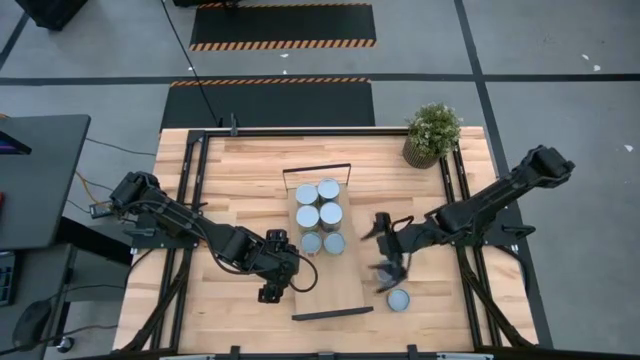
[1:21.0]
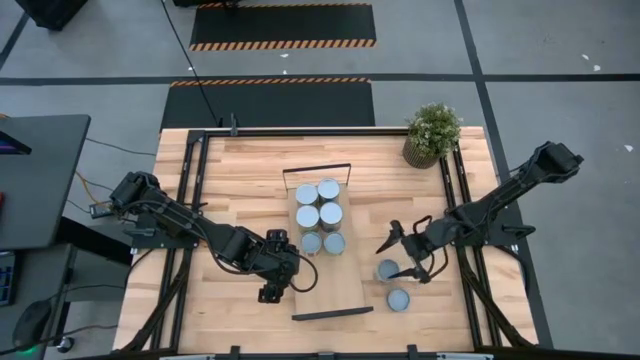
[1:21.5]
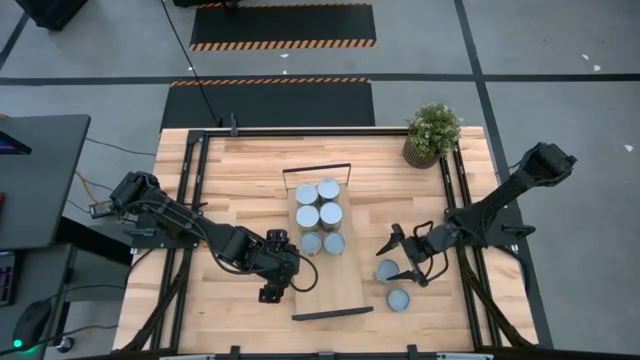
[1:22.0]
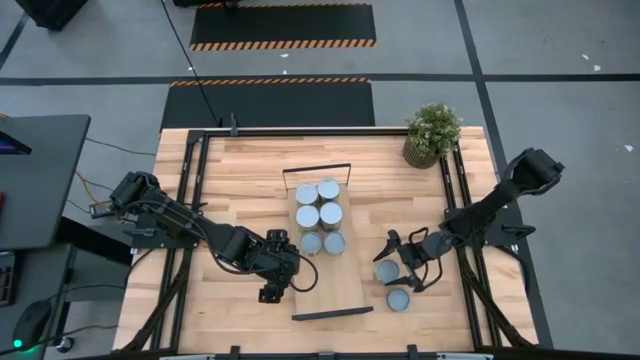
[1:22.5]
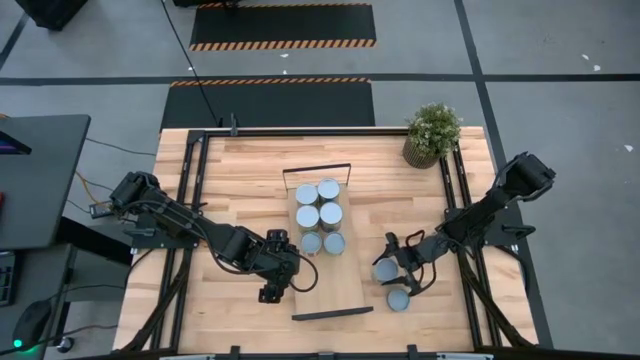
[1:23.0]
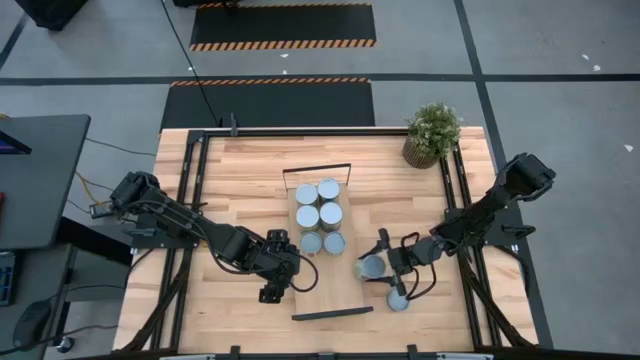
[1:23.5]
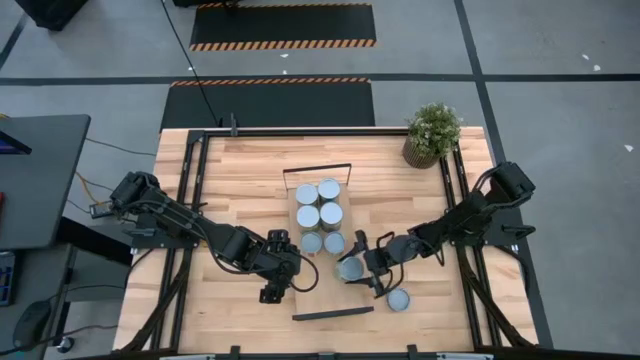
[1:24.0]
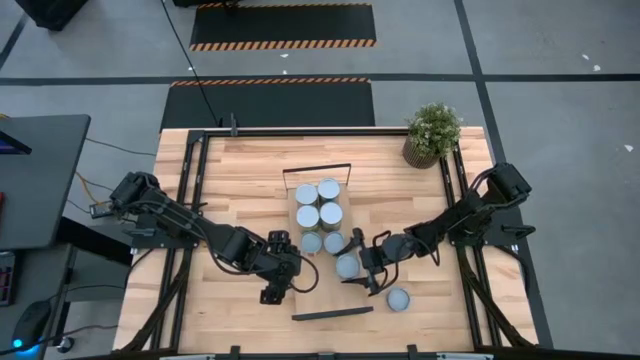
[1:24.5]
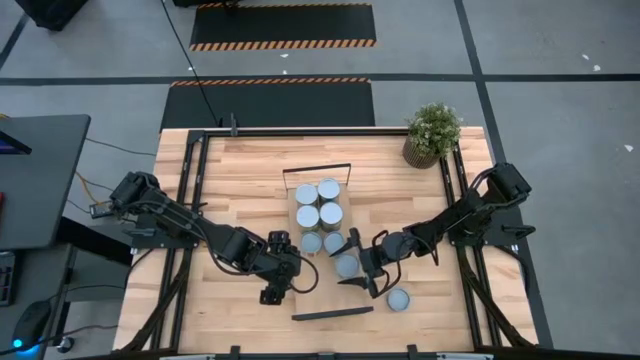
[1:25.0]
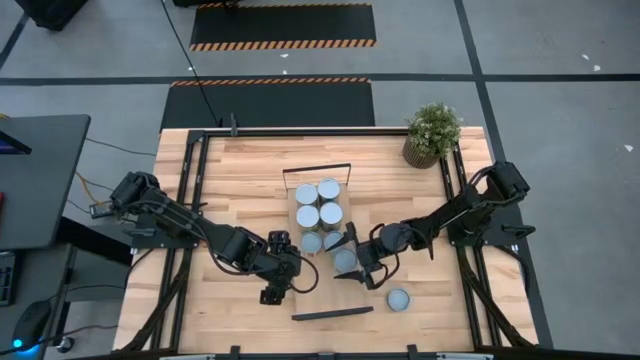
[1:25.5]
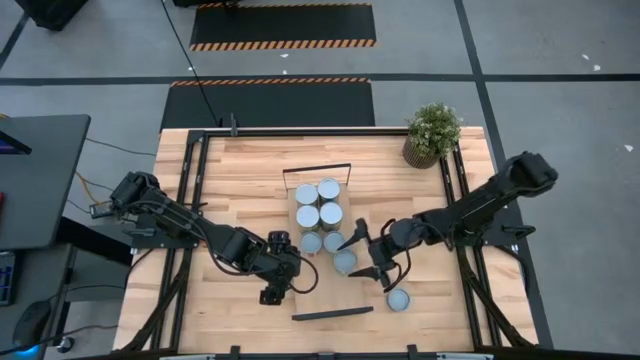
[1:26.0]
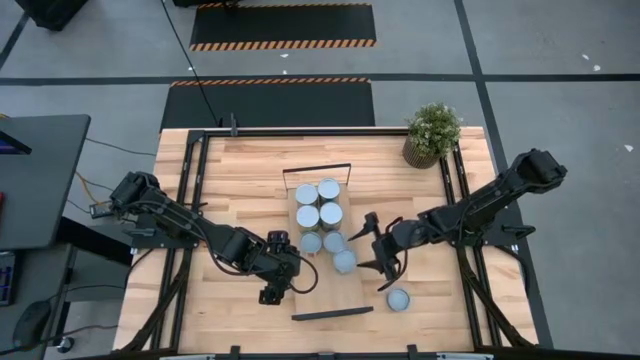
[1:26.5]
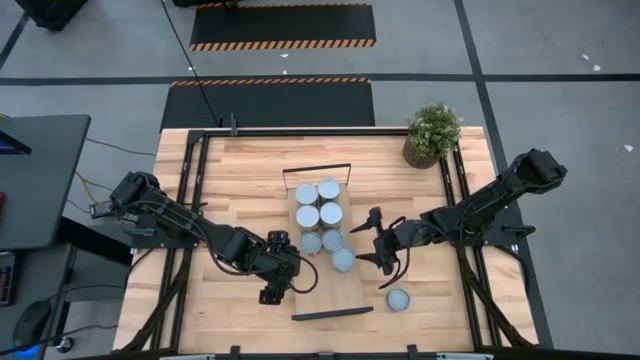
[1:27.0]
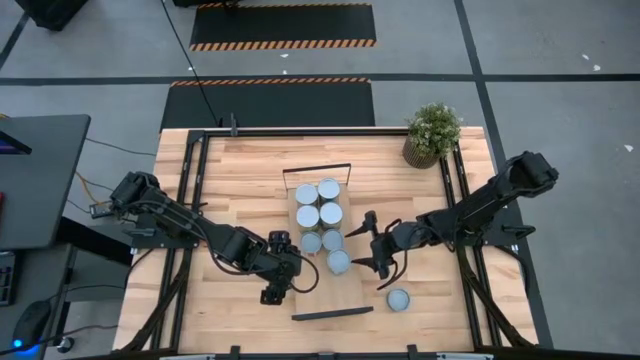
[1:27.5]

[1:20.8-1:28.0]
Task: Pick and place cans onto a shelf
Put the canned mixed vegetable on the shelf

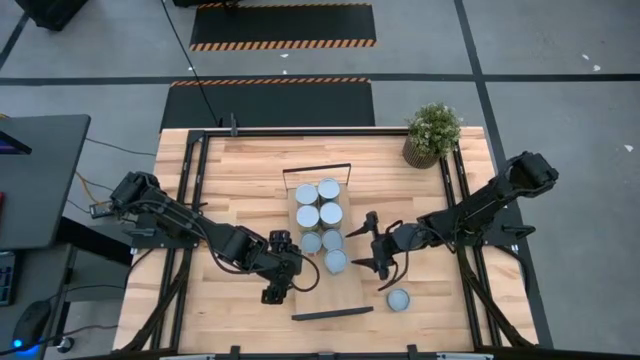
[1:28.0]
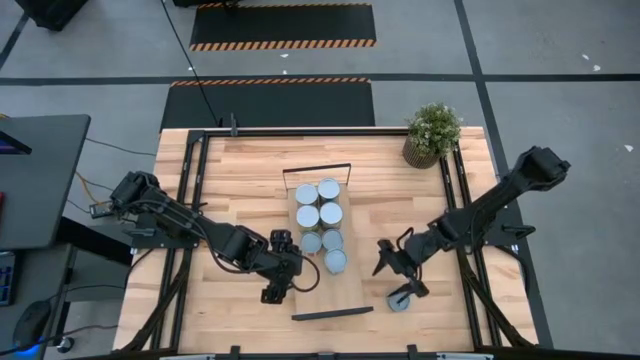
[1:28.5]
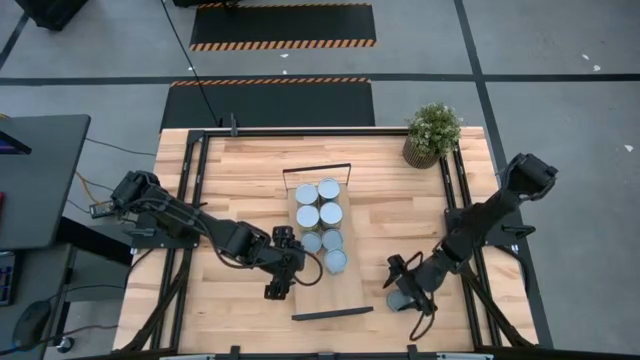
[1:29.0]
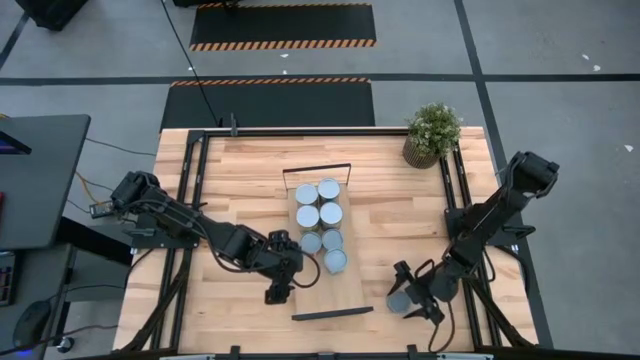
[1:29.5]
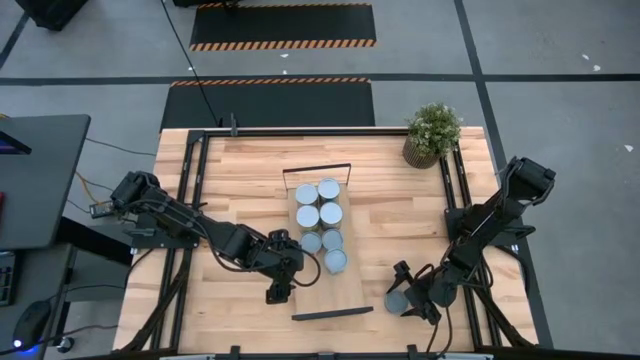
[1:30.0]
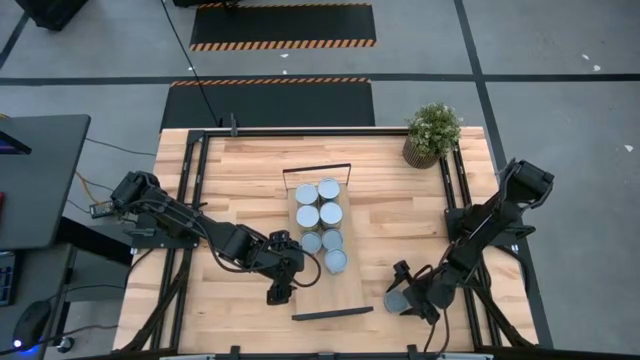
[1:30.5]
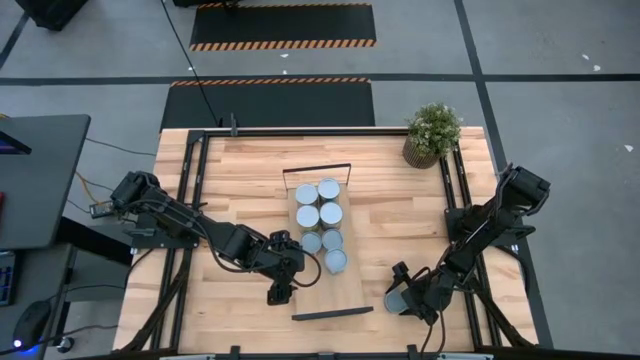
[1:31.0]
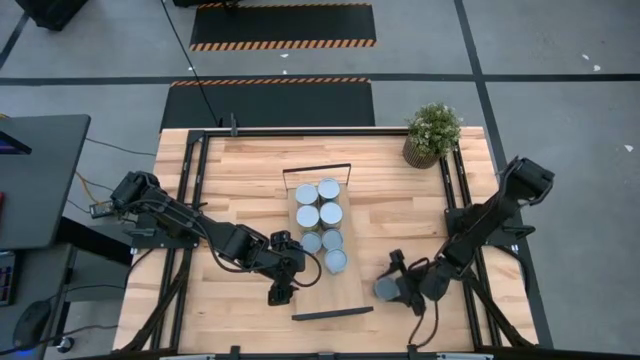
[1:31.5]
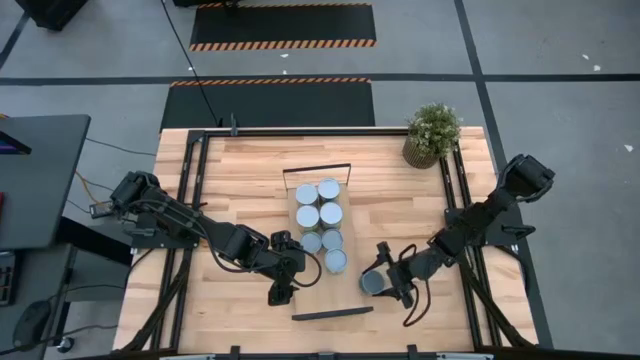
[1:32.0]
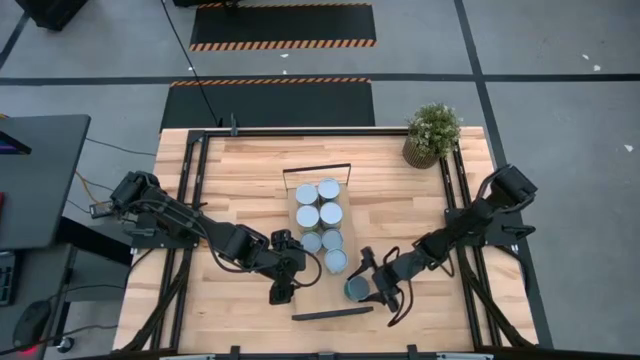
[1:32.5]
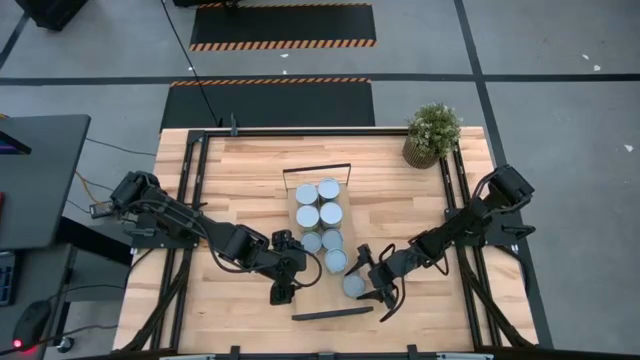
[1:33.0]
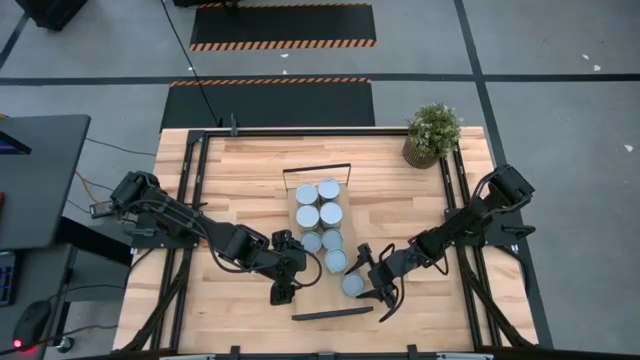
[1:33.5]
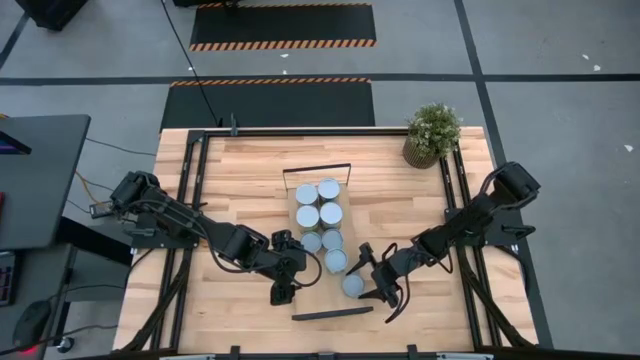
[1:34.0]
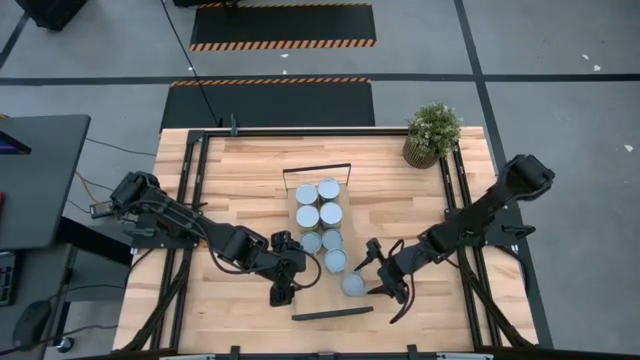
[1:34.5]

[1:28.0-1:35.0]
Put the blue tuna can on the shelf

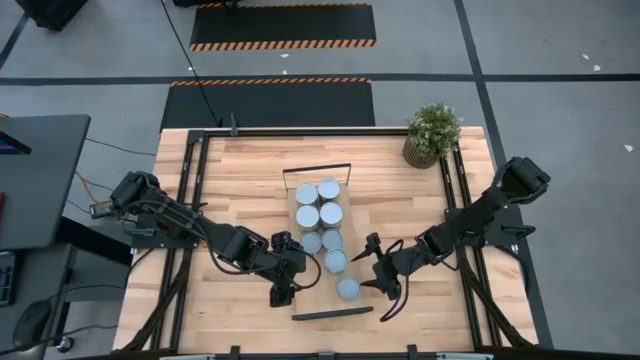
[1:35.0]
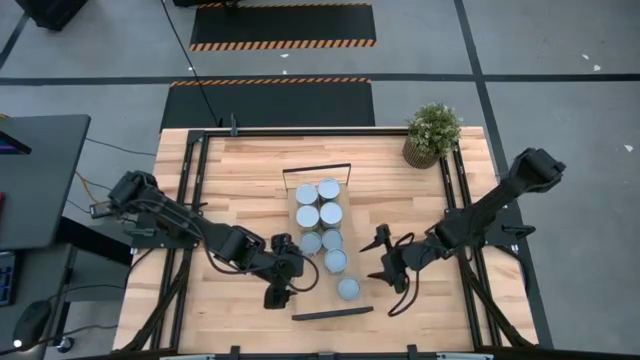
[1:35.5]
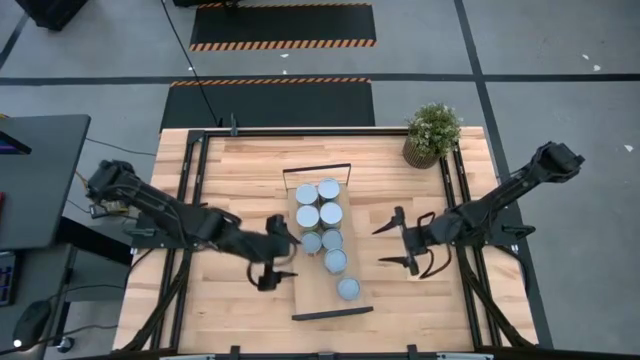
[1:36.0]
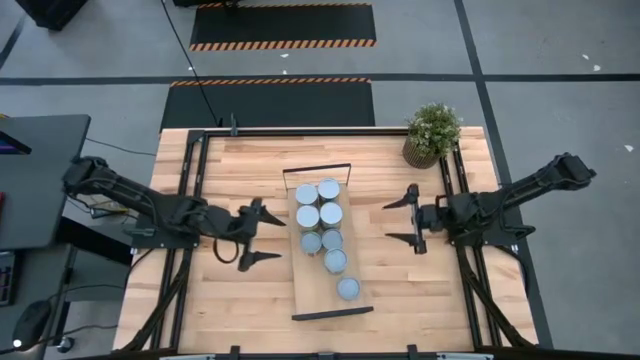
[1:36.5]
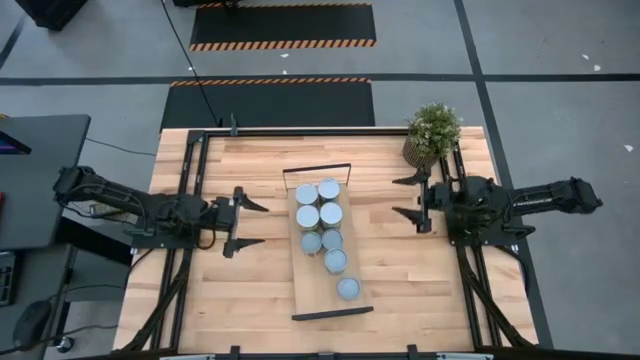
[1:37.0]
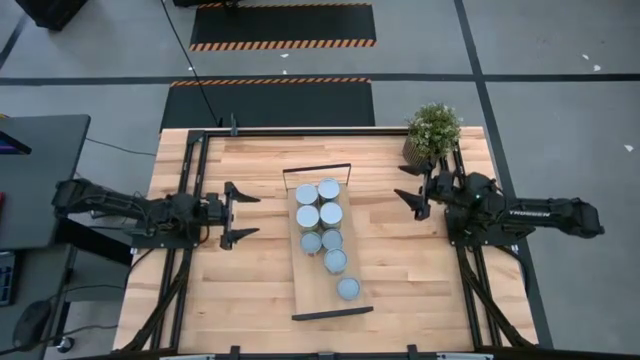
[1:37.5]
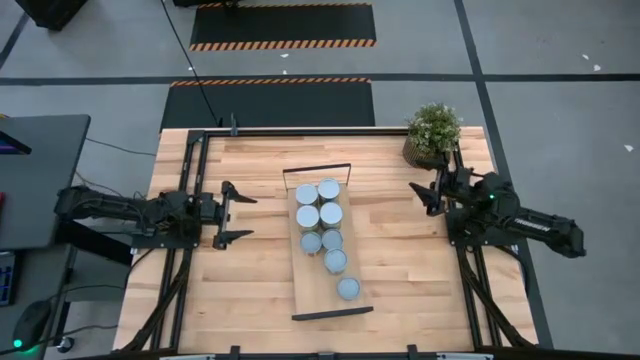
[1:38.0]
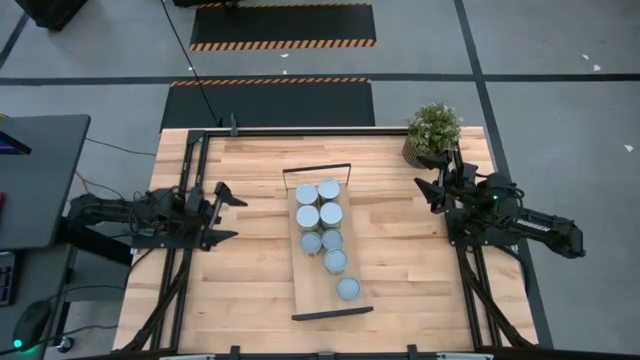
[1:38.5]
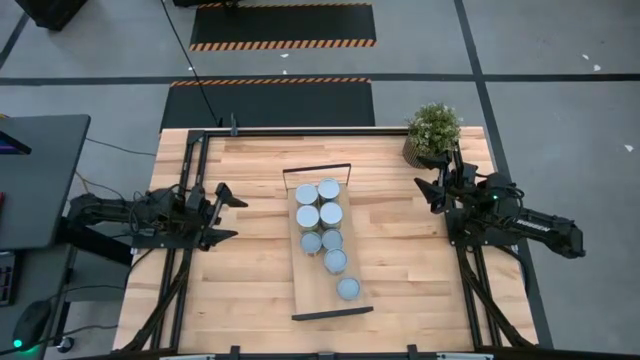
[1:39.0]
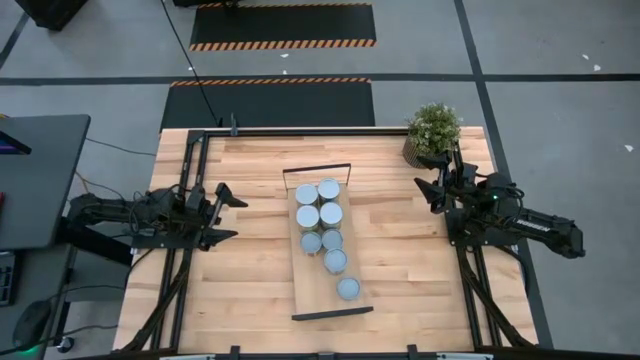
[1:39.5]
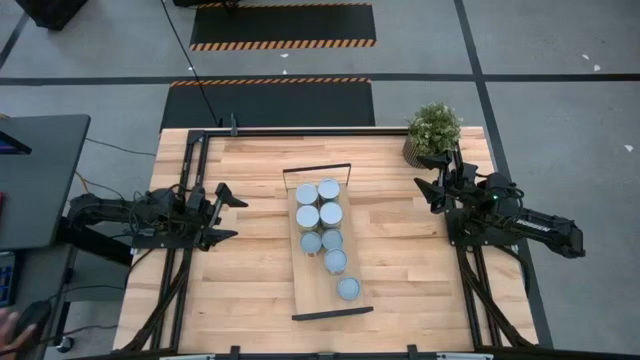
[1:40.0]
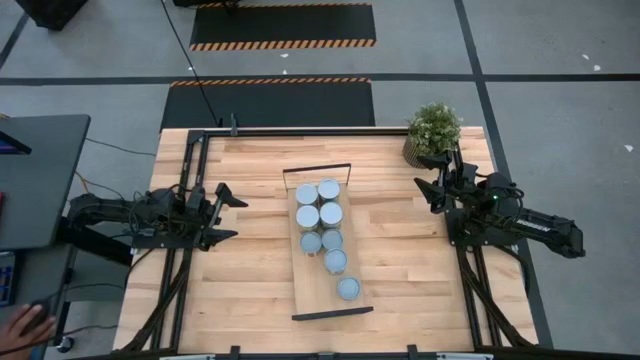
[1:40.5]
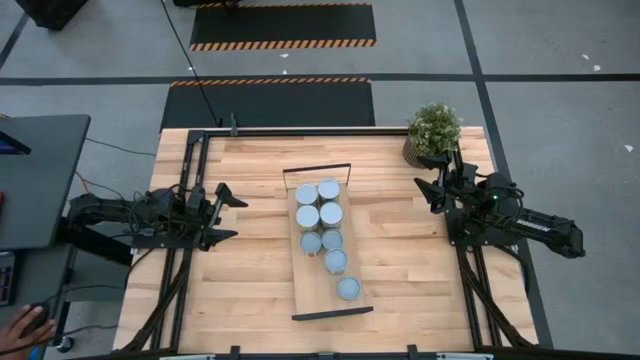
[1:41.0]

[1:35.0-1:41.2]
Return to Home Position

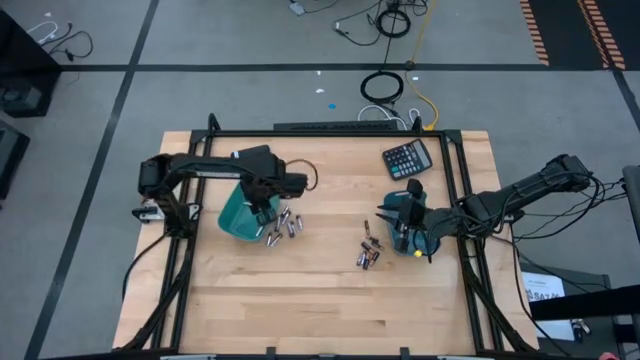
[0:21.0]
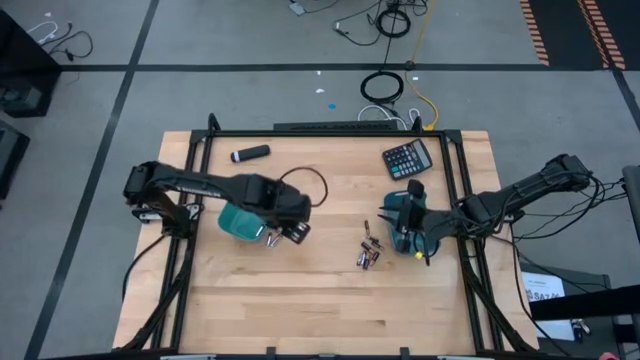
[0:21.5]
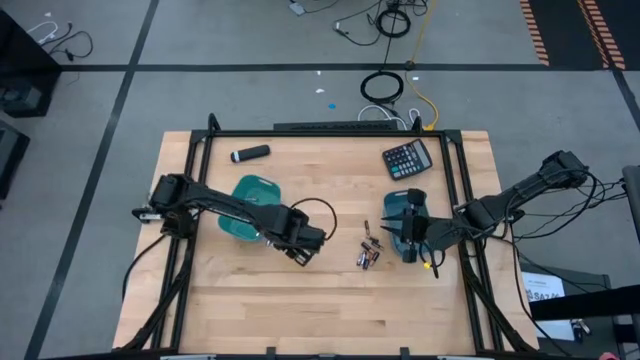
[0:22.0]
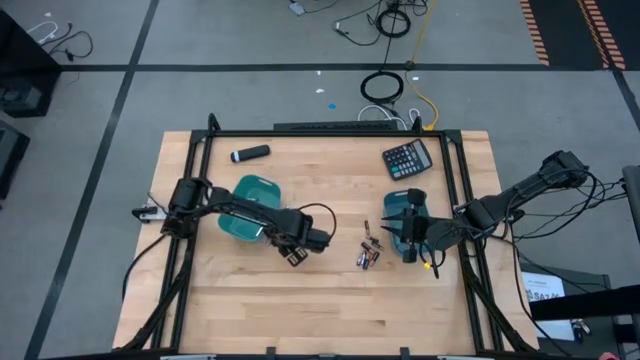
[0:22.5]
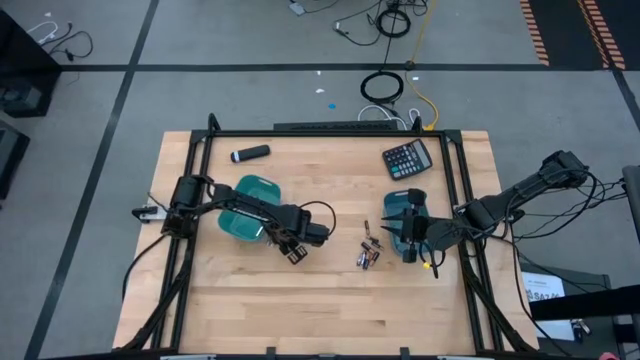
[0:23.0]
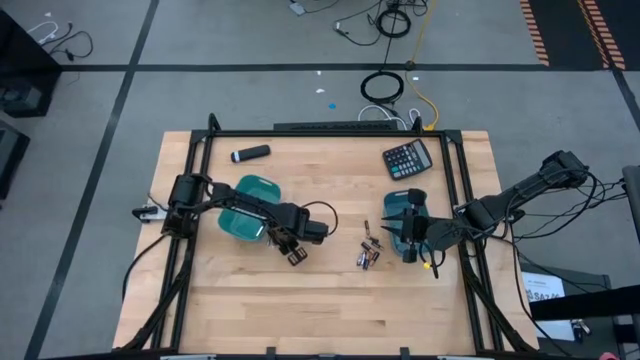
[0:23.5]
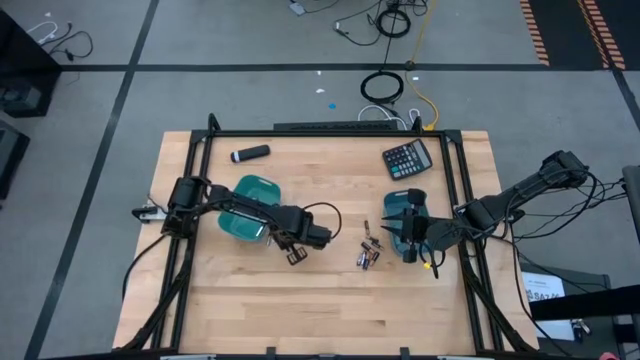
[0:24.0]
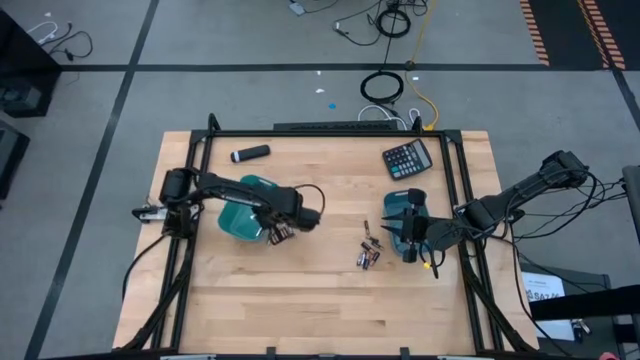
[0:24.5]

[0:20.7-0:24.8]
Task: Sort batteries
Put the silver battery into the green bin
